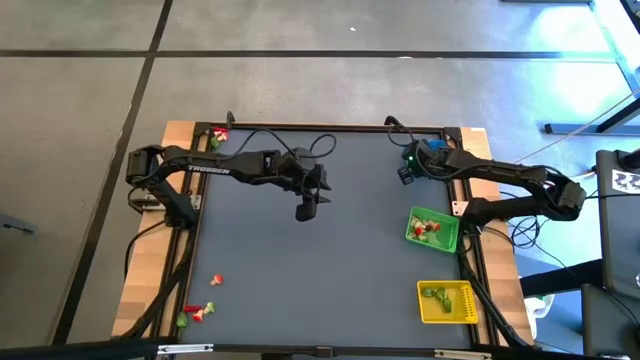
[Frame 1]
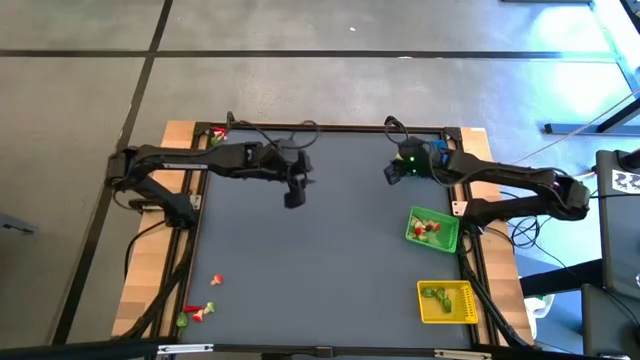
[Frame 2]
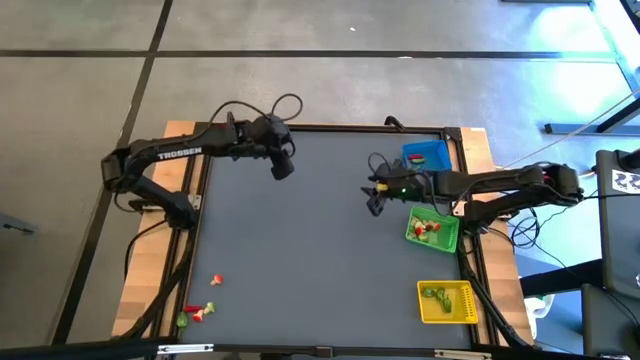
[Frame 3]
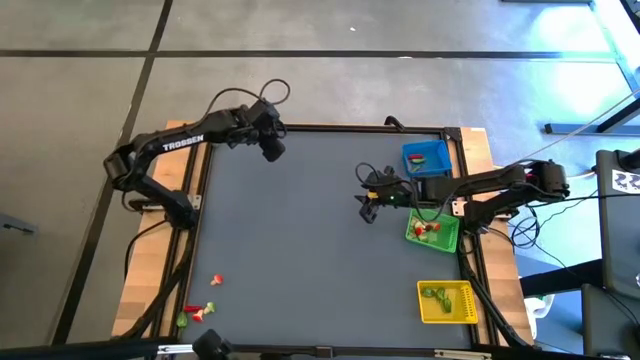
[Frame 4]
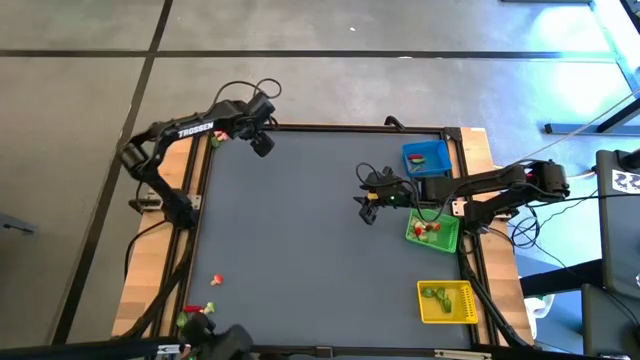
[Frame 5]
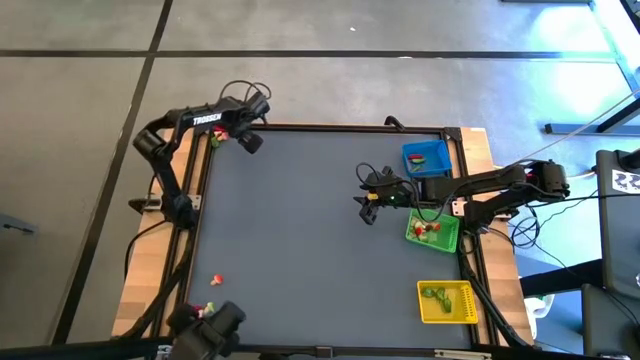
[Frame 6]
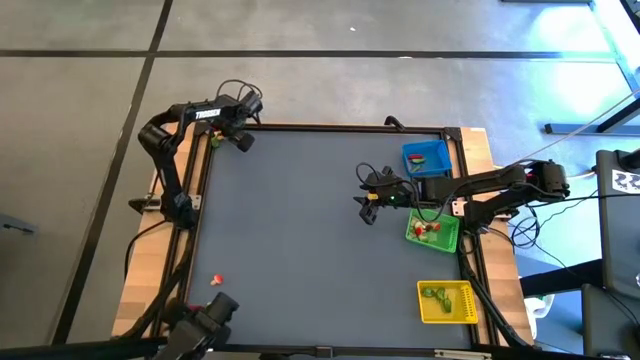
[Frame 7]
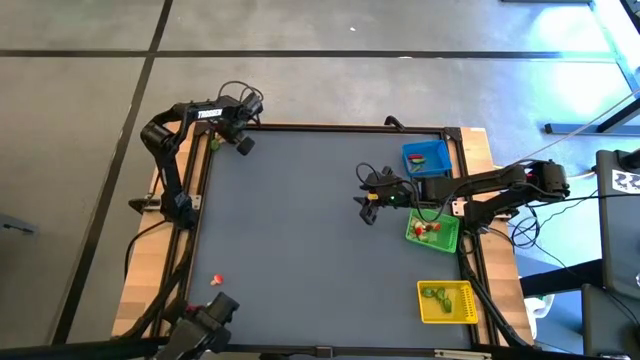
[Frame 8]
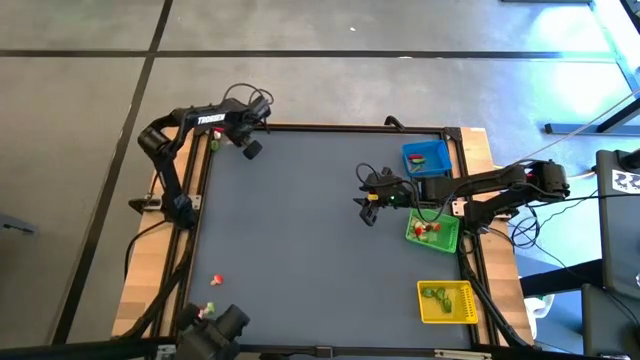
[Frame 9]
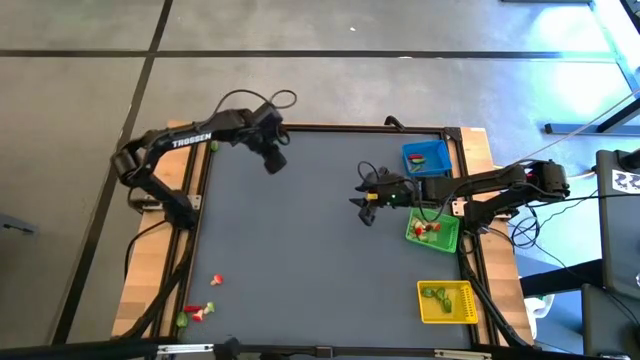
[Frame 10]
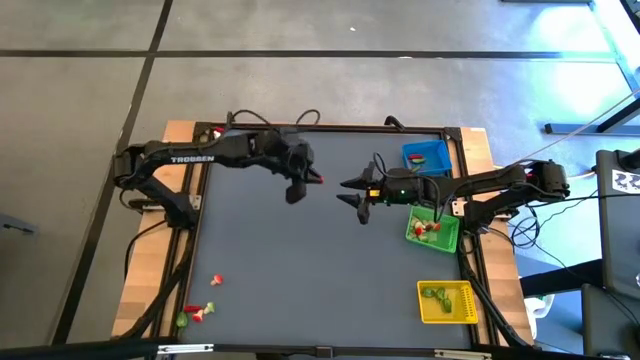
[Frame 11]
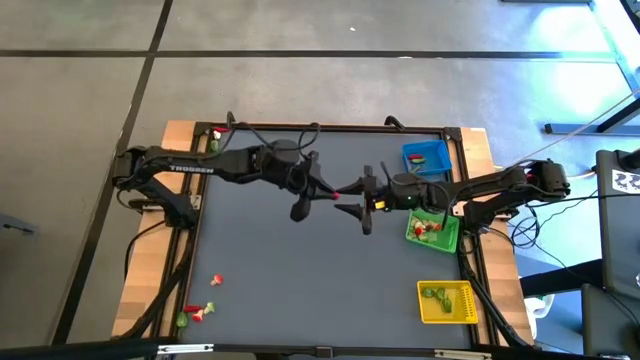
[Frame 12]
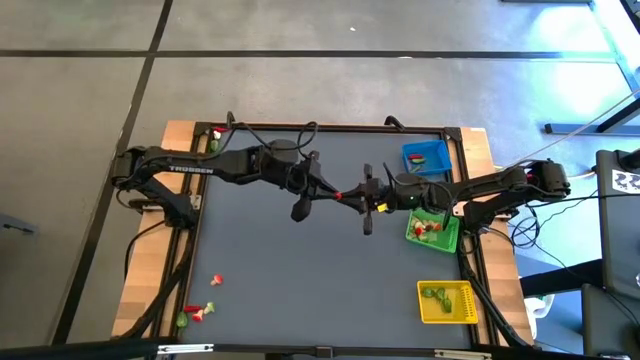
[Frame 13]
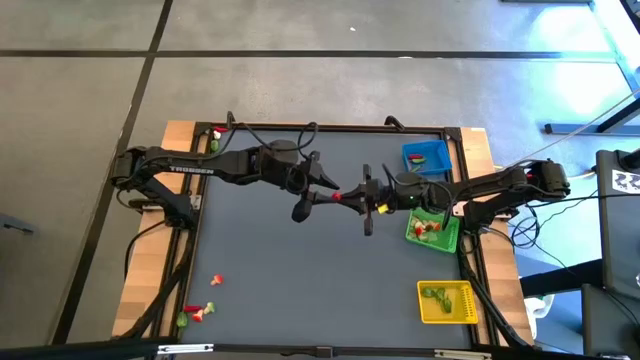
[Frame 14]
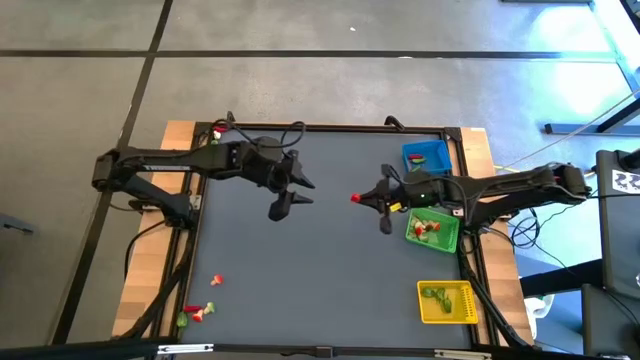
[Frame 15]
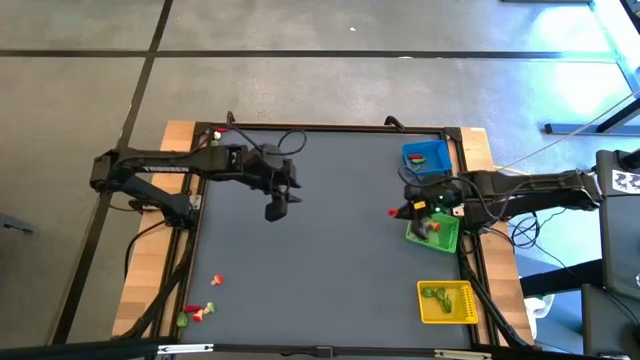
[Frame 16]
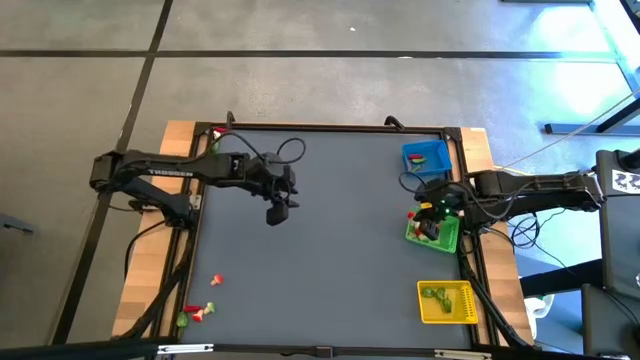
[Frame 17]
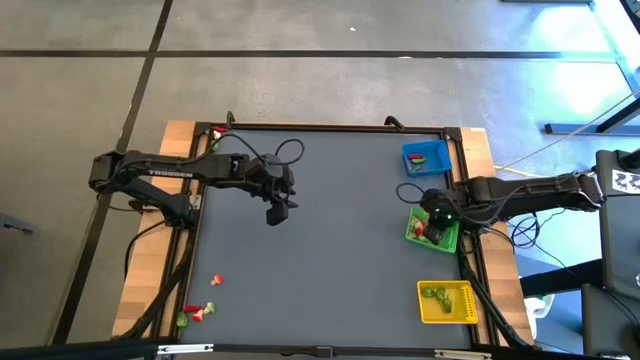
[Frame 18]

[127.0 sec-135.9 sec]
Task: Sort produce into baskets
Put the red mushroom into the green basket

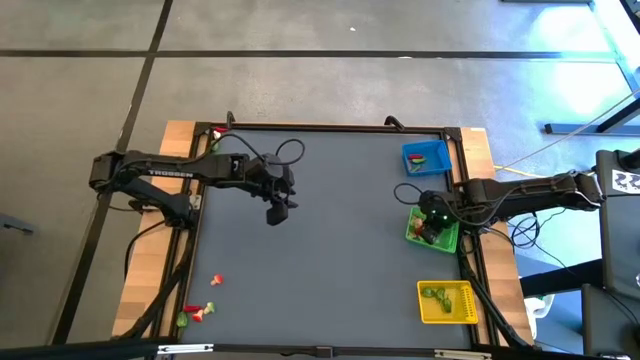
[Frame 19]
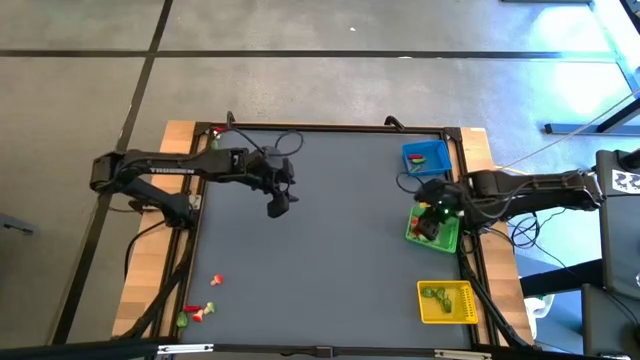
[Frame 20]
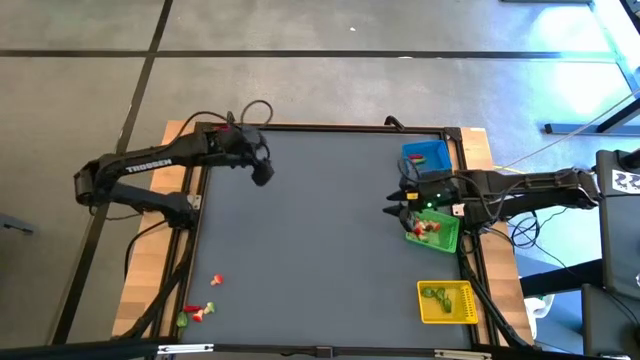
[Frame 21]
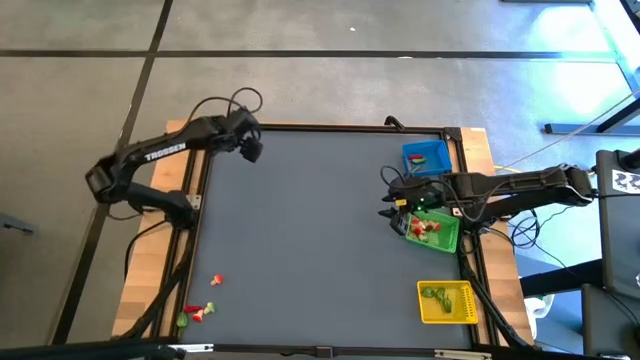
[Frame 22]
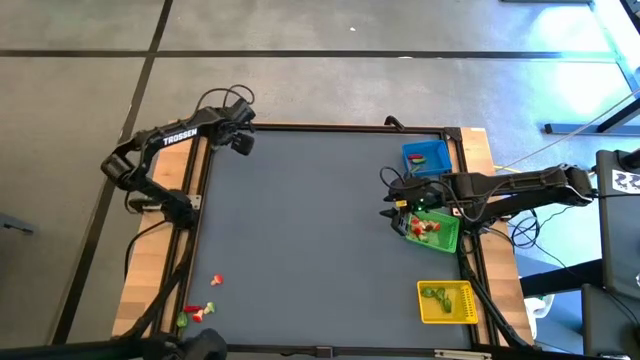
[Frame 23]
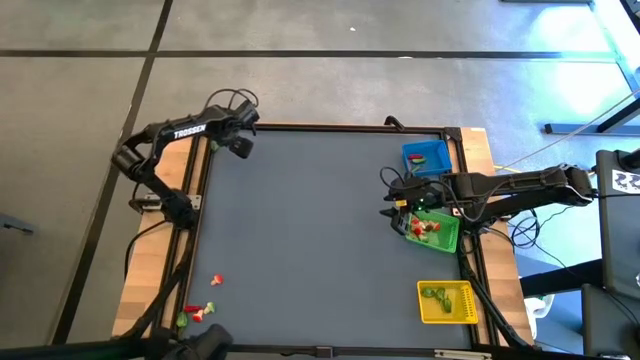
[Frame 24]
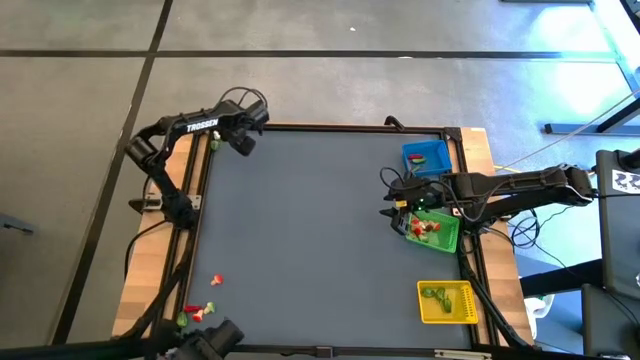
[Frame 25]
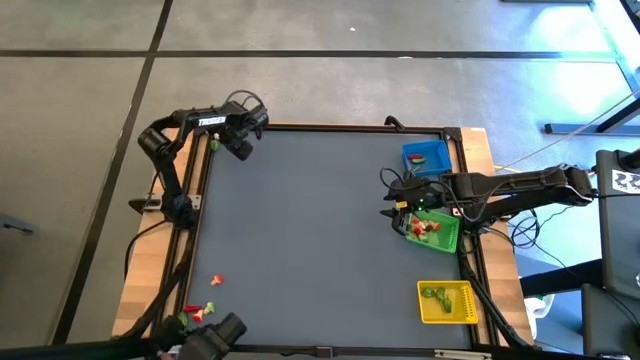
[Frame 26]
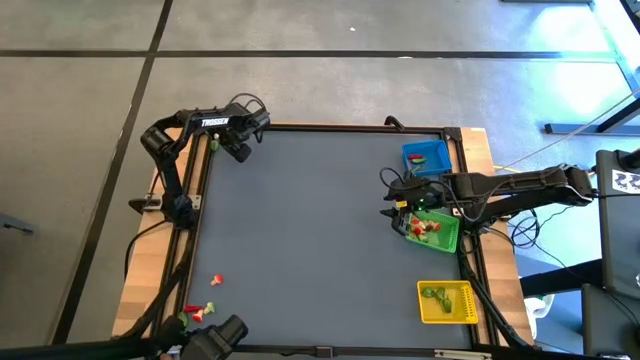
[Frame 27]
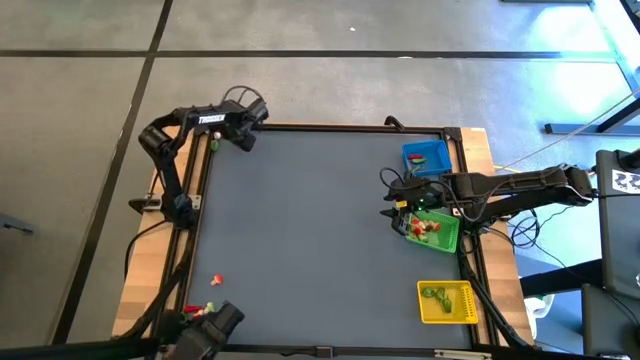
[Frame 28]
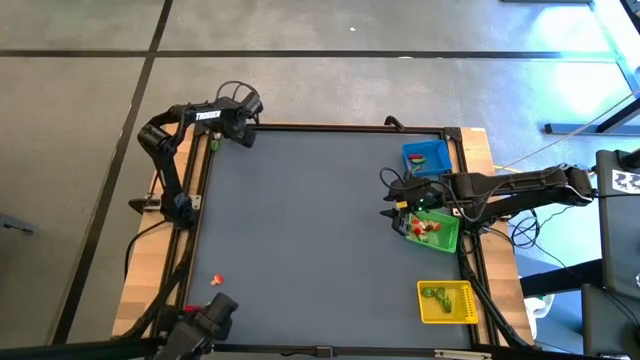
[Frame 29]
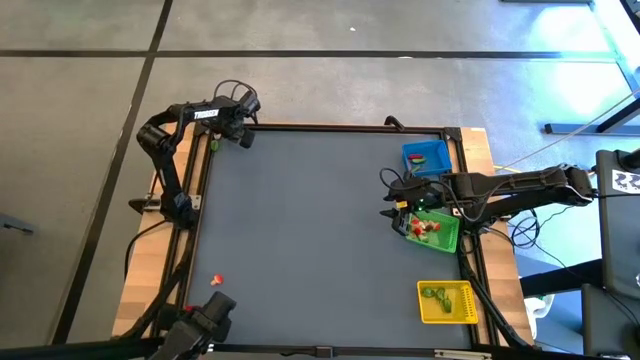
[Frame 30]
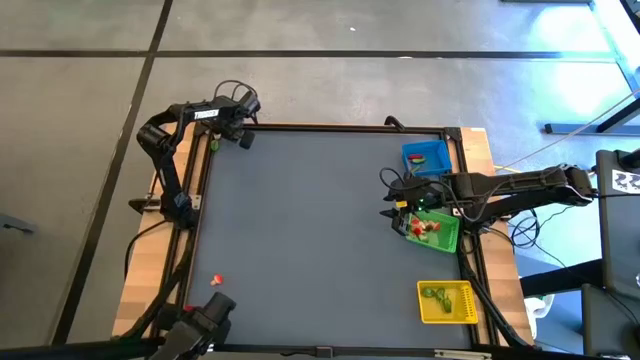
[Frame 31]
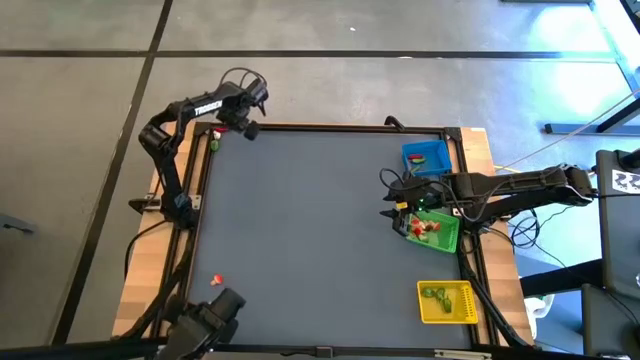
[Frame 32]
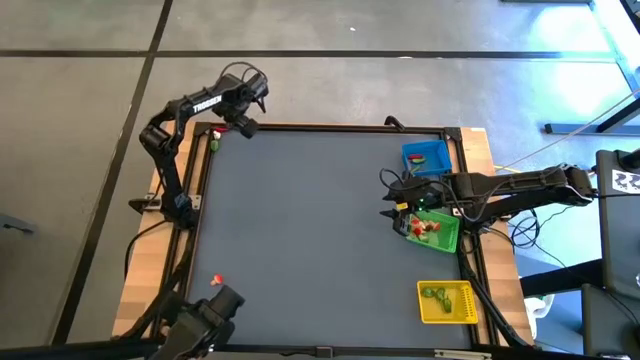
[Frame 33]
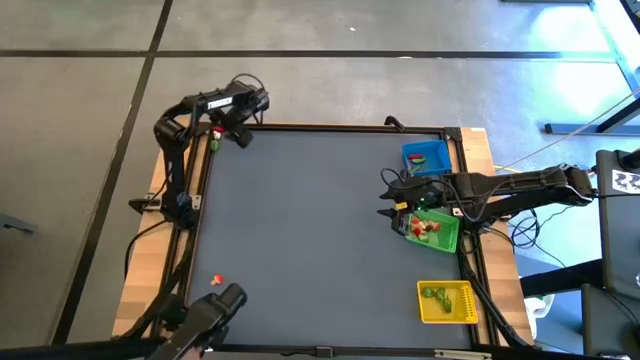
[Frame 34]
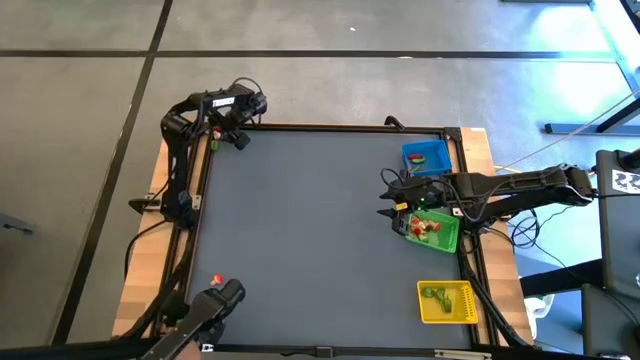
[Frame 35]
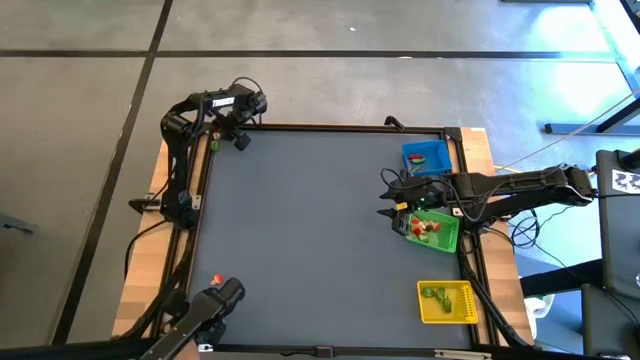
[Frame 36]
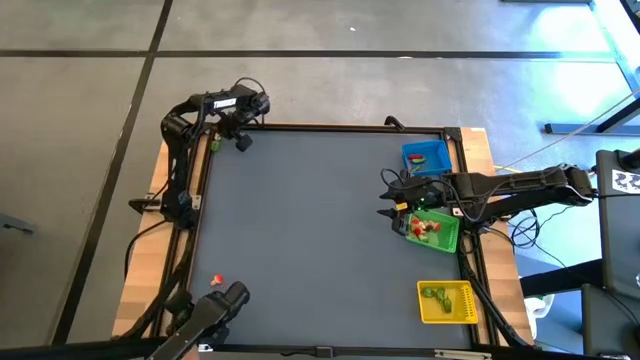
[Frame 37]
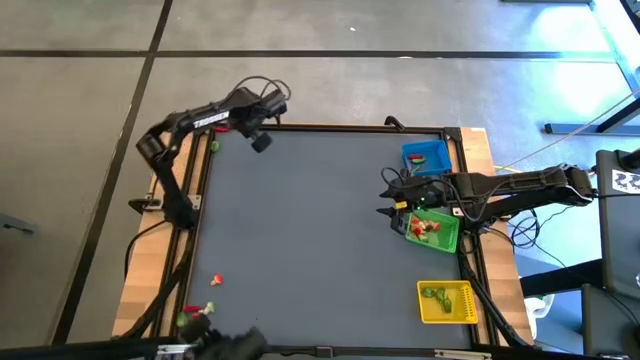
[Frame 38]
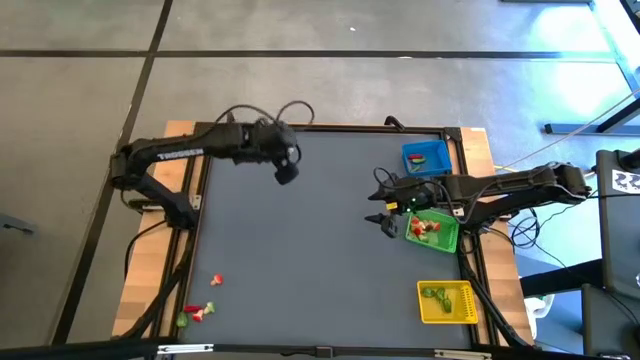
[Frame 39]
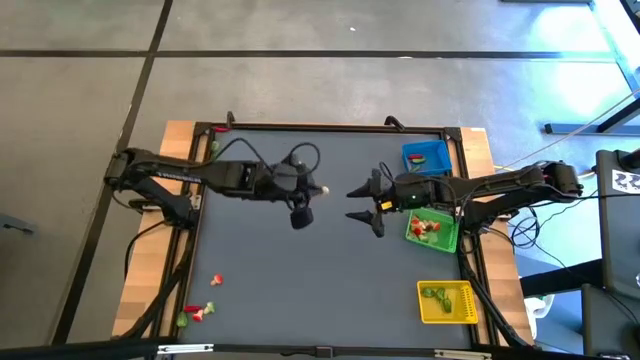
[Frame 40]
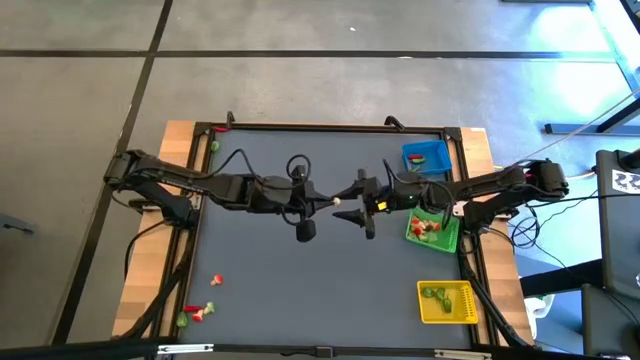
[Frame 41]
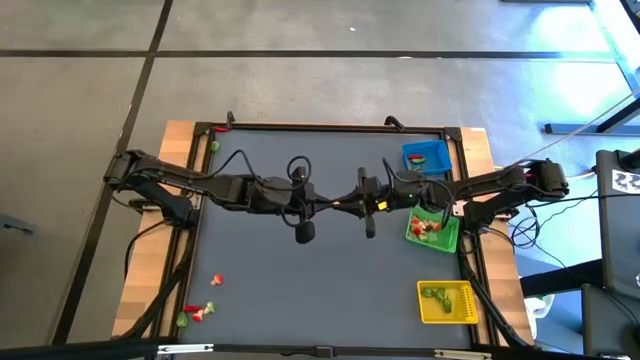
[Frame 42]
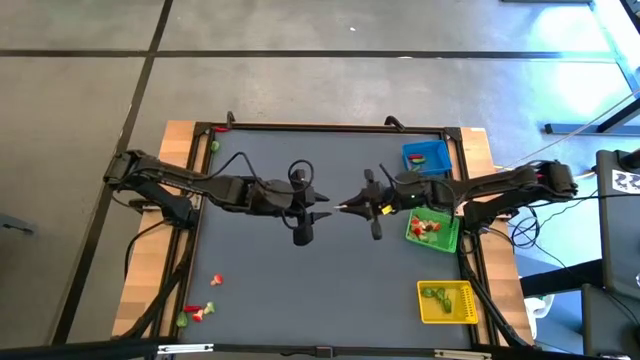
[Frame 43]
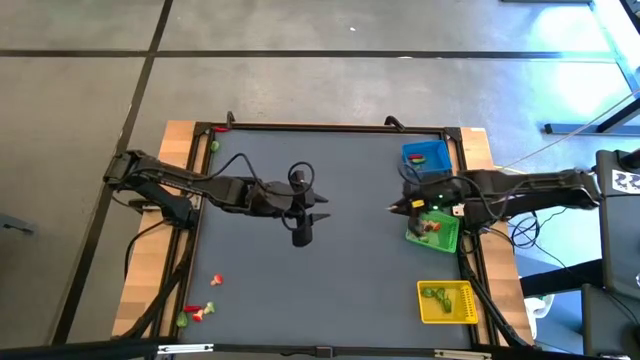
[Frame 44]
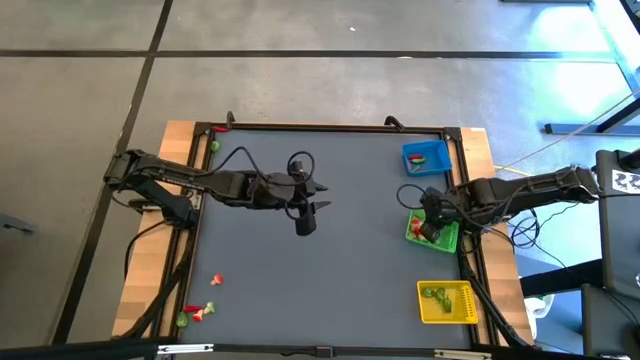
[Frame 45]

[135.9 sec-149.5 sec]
Put the brown mushroom into the green basket
